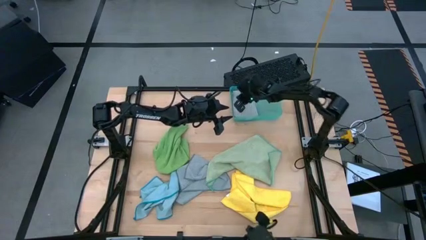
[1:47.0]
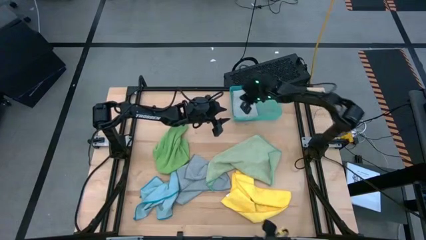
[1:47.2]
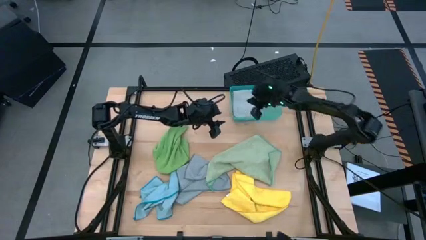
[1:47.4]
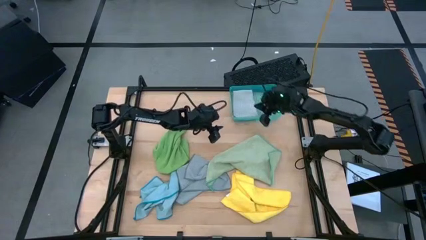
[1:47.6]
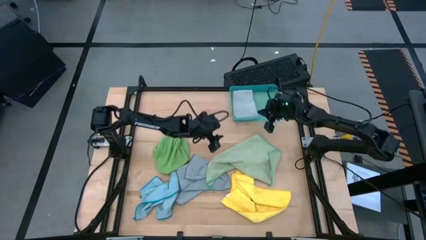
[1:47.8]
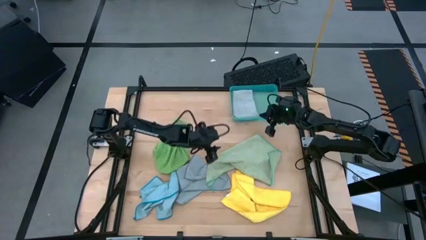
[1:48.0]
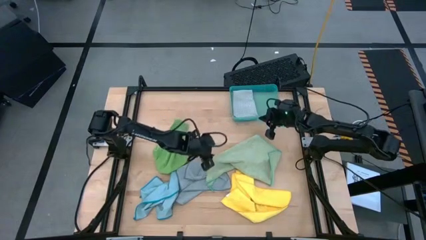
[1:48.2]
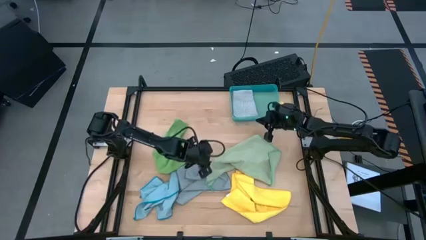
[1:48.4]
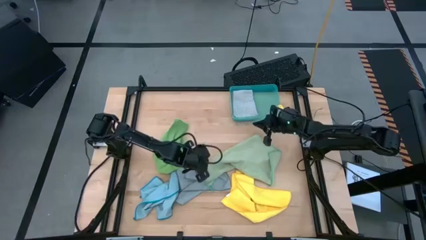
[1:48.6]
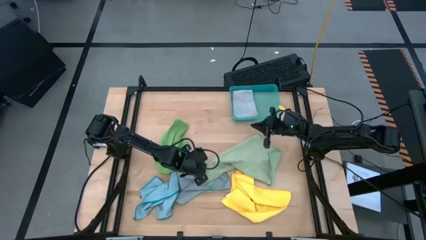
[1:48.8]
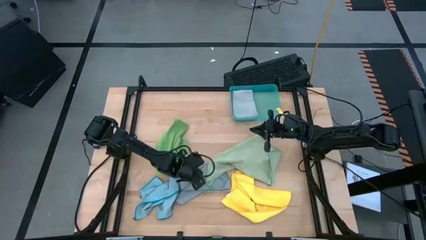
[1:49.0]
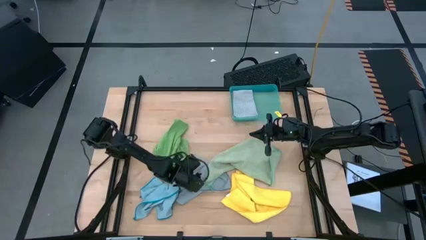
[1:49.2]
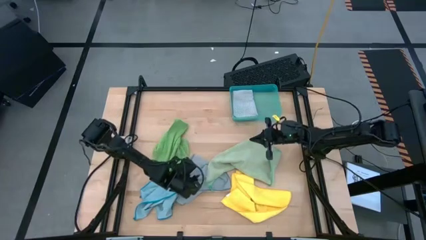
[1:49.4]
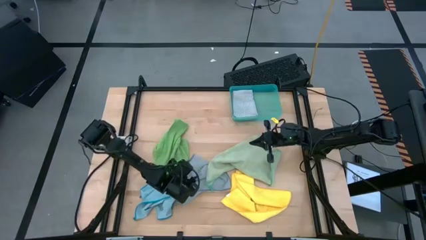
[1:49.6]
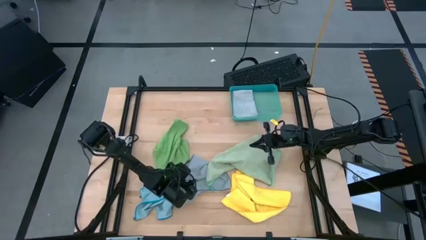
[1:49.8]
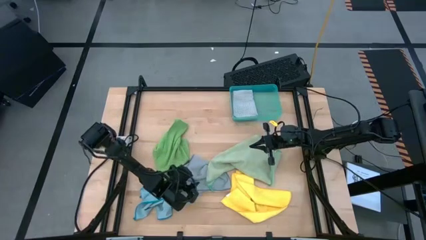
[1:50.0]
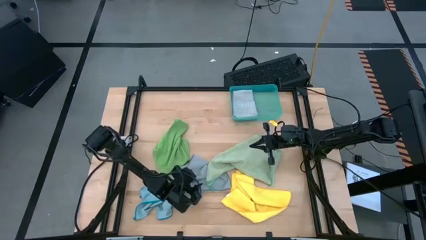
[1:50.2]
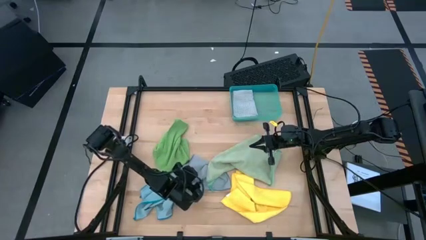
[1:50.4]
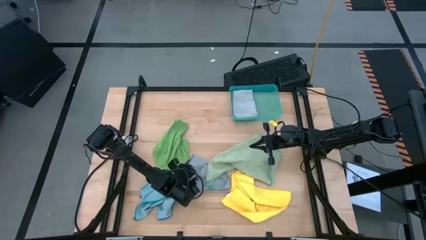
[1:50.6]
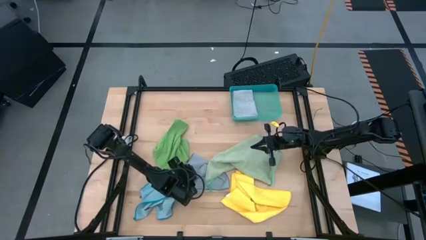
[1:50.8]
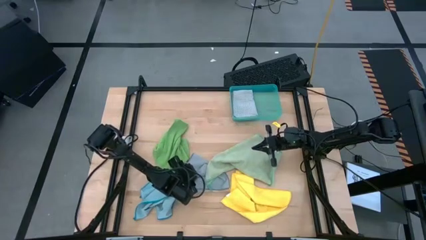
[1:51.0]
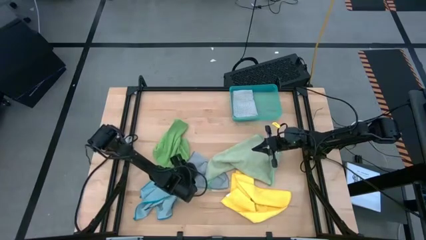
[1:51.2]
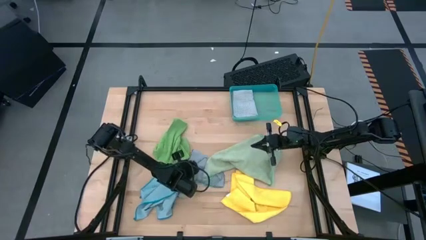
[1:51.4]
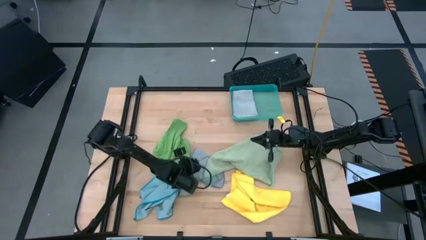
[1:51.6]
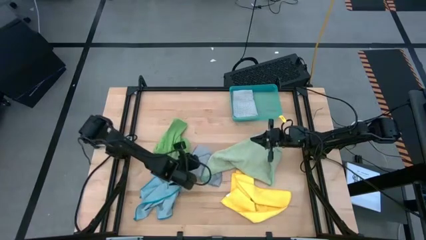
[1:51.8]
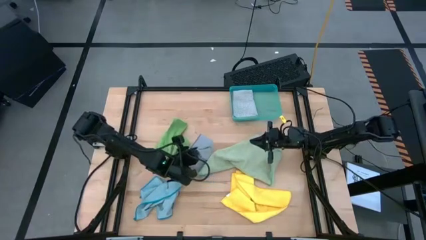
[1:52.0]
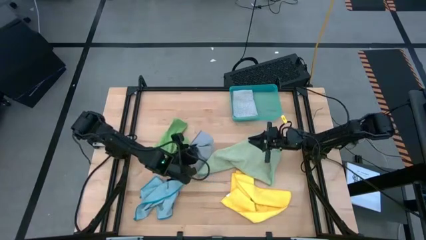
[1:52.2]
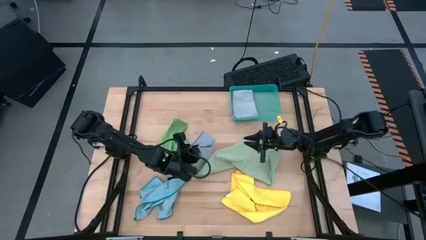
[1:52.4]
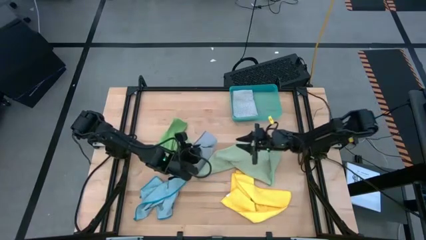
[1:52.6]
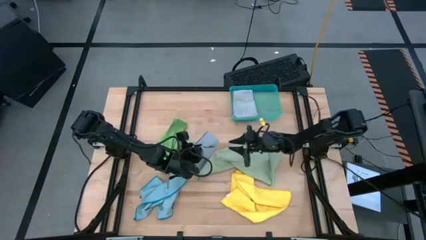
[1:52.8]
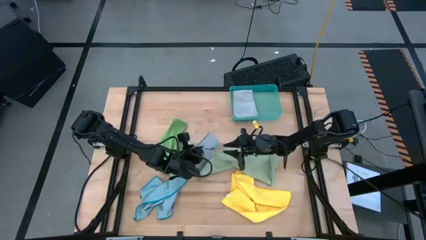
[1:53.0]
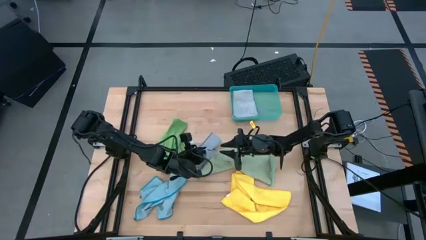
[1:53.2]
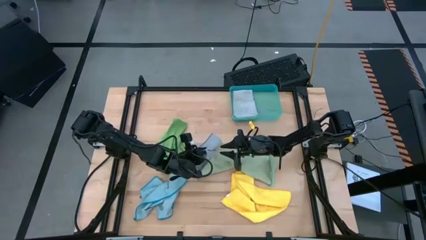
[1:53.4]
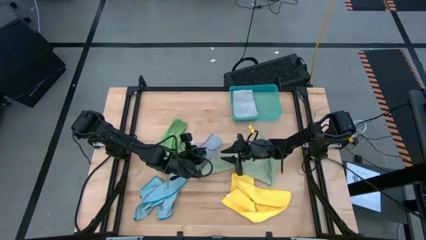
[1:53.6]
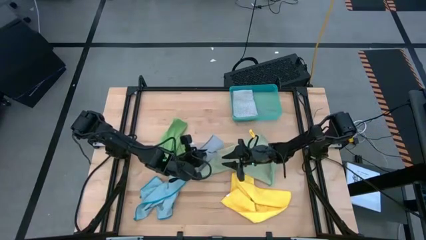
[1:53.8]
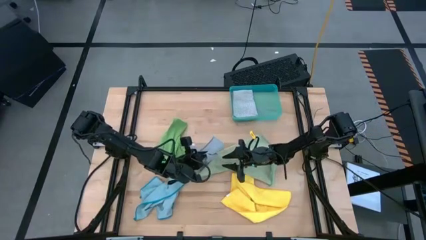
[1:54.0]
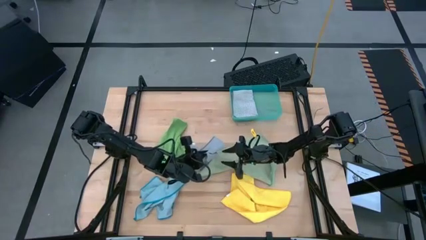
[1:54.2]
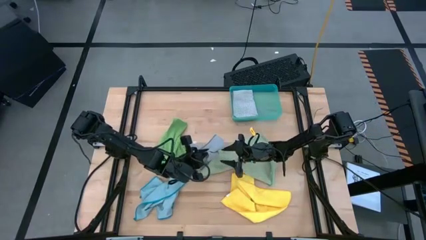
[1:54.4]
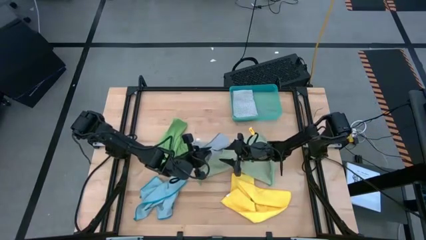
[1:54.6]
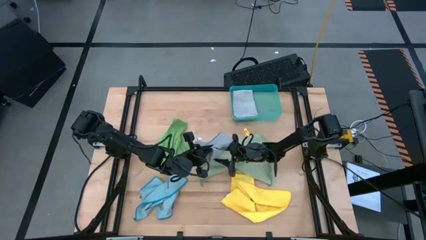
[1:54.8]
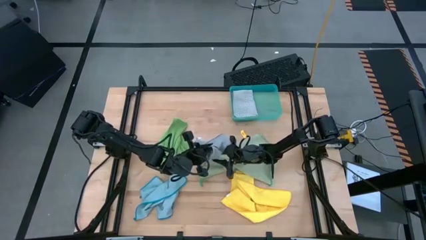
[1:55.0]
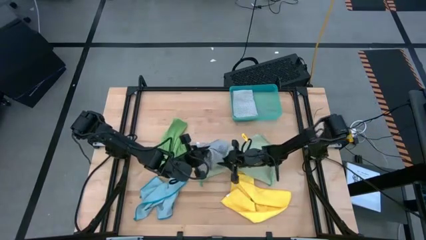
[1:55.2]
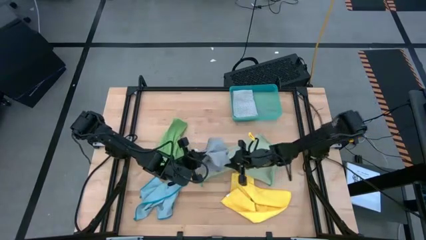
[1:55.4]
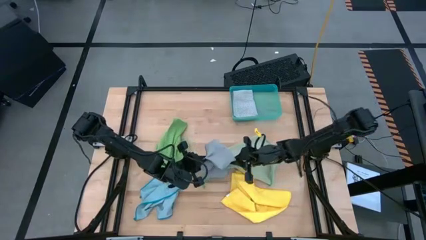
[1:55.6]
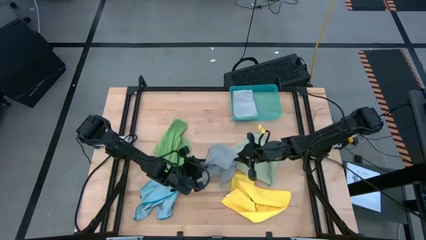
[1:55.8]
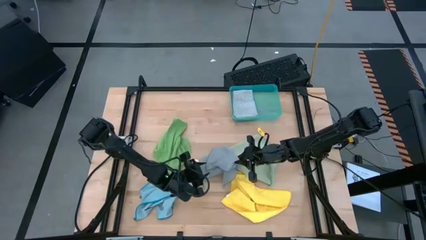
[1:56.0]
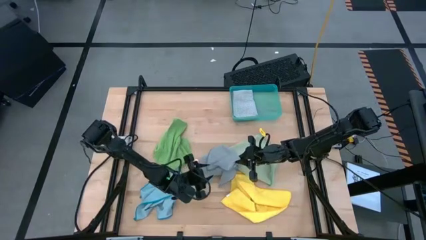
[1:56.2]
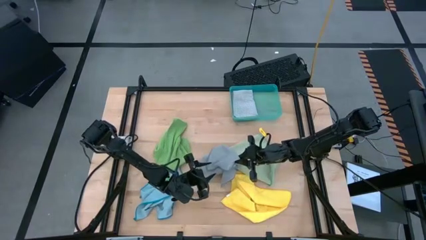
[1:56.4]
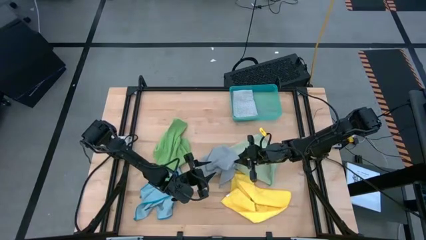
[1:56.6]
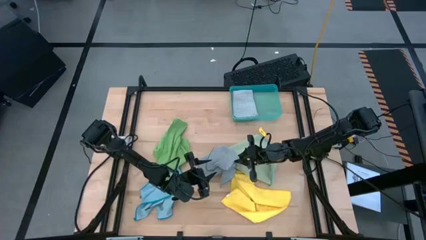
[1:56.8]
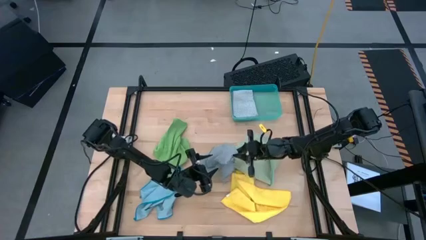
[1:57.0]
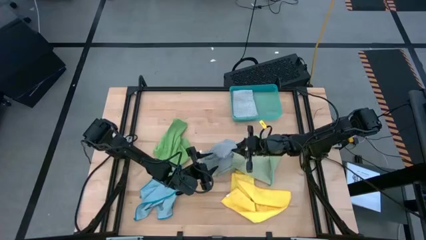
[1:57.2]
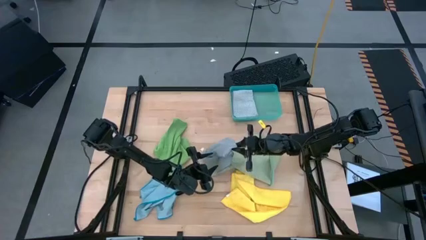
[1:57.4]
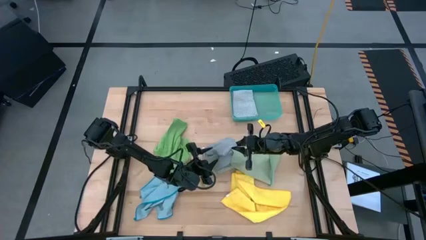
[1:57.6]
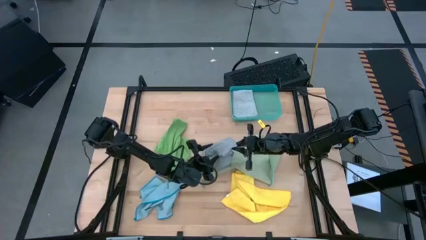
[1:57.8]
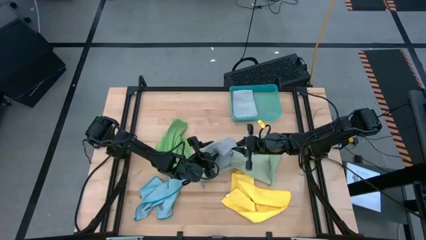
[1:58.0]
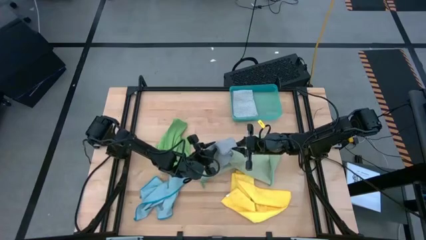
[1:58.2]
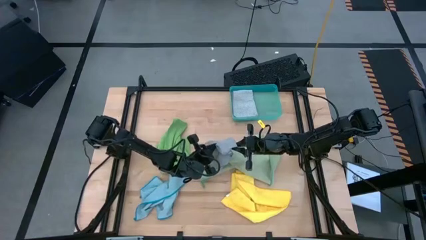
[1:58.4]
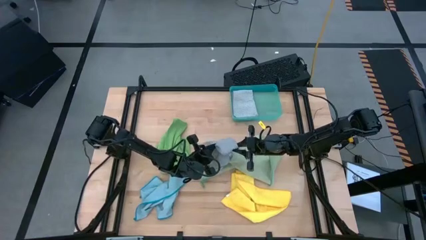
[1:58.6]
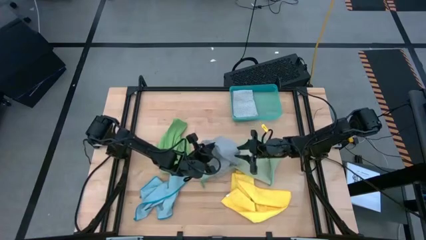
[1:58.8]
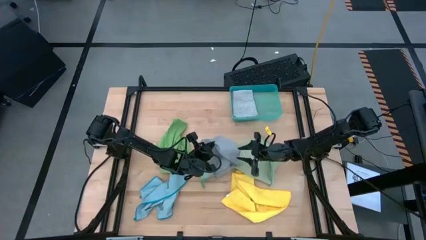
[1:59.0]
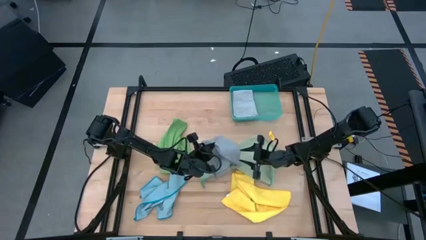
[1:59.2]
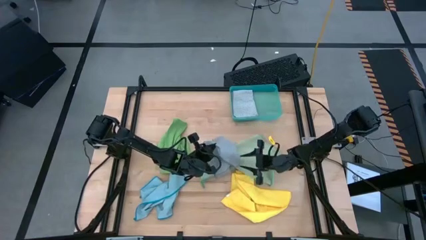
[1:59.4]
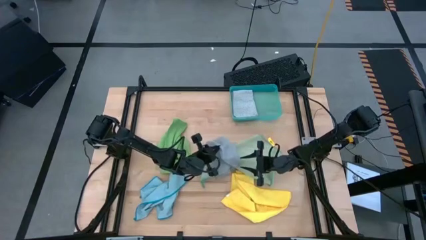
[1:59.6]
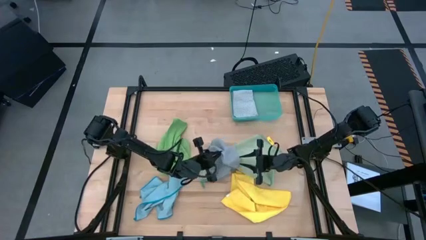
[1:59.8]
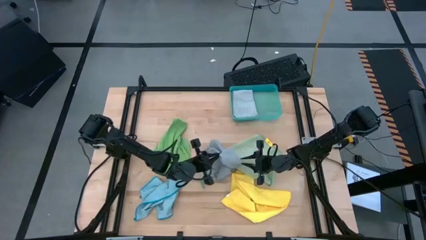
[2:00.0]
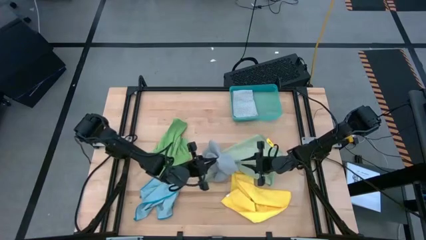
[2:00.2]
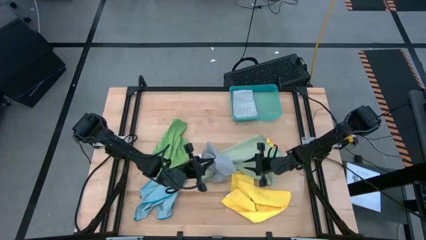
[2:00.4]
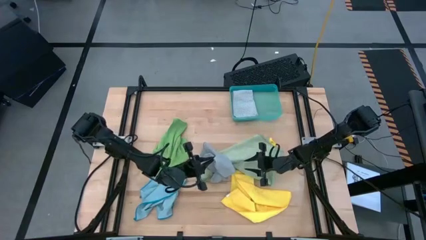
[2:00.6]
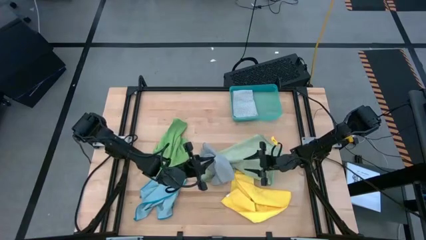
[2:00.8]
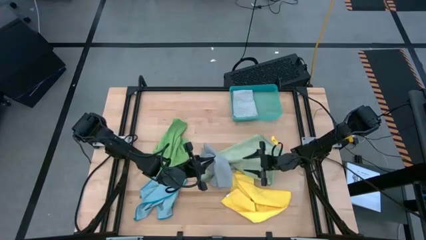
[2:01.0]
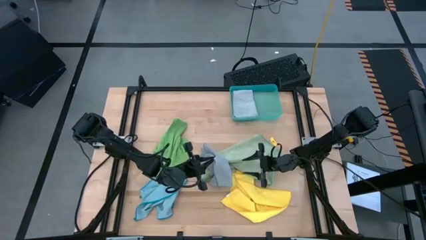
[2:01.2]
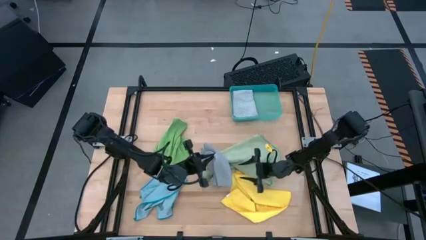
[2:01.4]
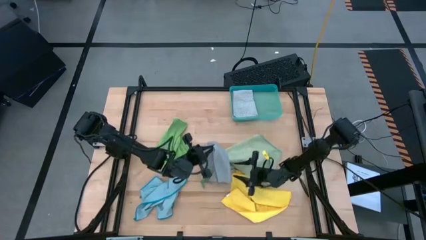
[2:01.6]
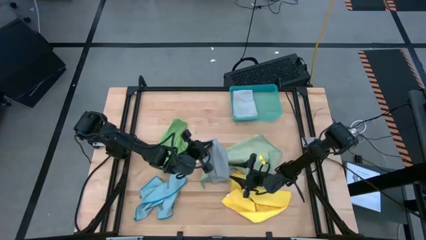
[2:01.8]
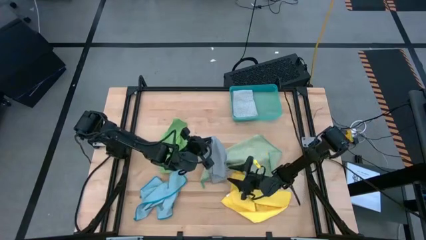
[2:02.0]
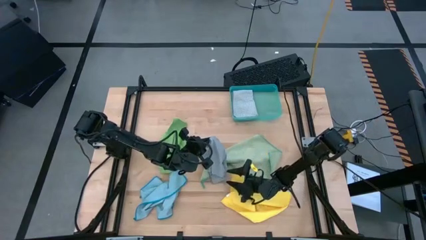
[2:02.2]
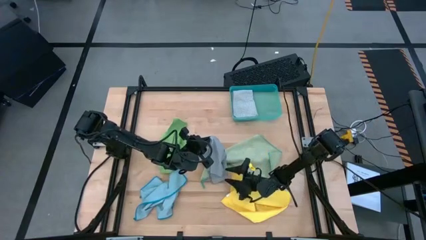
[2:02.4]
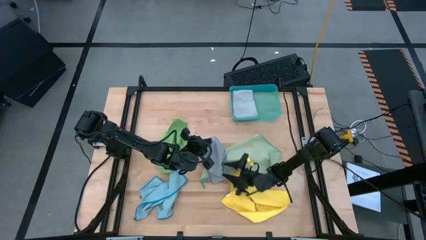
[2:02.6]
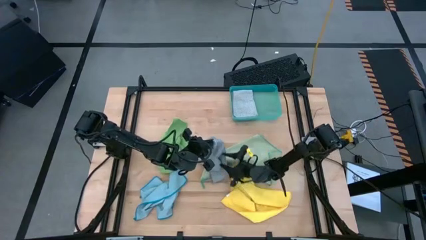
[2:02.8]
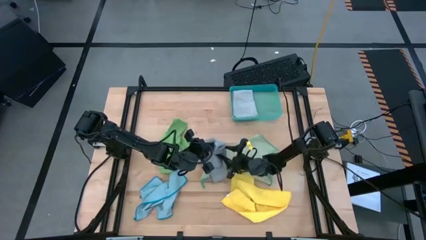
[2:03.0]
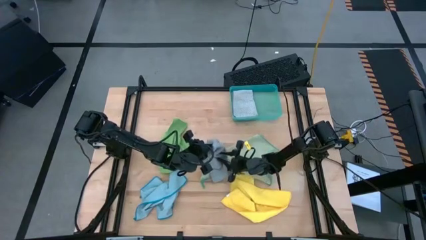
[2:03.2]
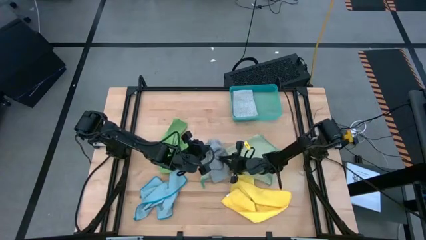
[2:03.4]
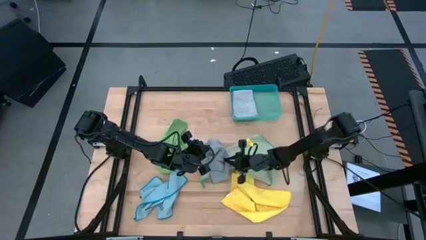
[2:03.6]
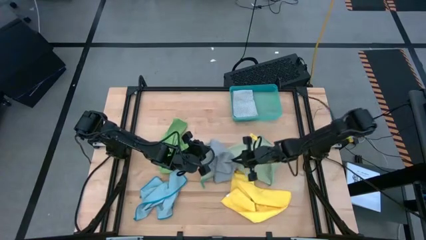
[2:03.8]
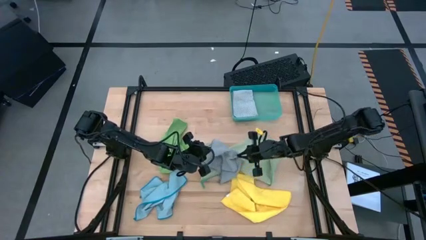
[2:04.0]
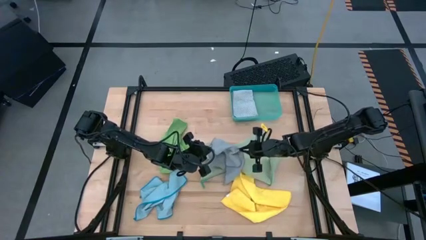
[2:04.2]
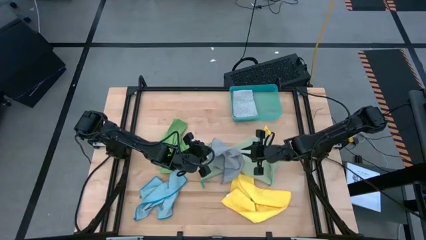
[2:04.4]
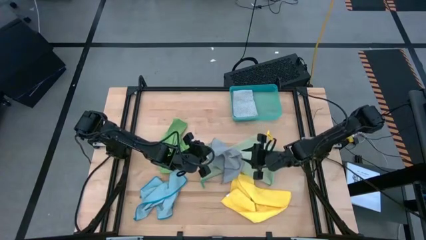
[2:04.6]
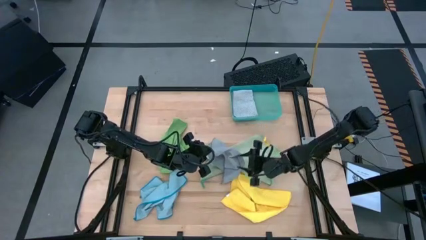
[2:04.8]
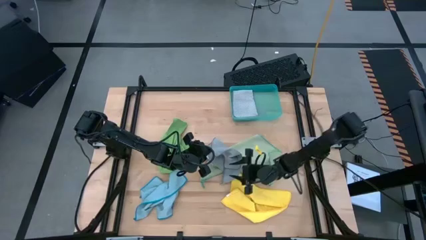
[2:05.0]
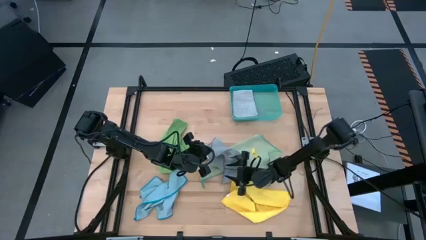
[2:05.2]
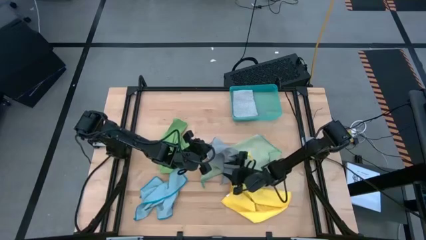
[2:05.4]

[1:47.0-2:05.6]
Task: Fold microfiber towels
Fold the gray microfiber cloth
